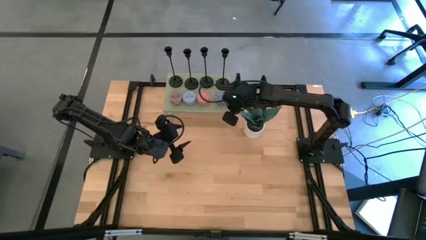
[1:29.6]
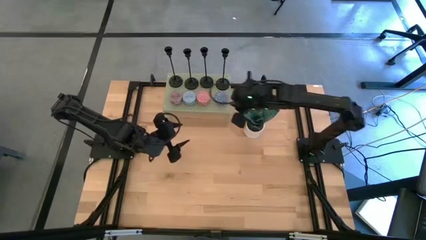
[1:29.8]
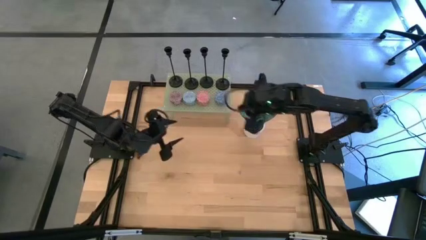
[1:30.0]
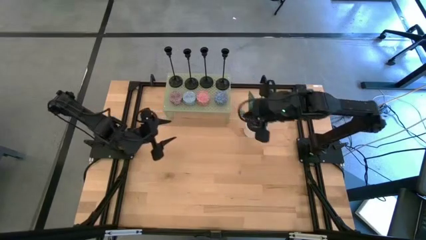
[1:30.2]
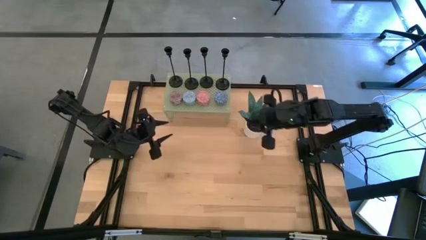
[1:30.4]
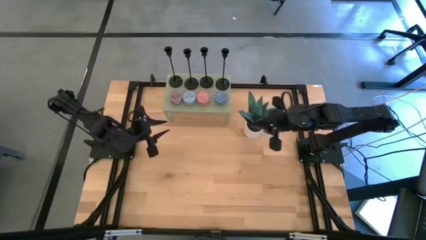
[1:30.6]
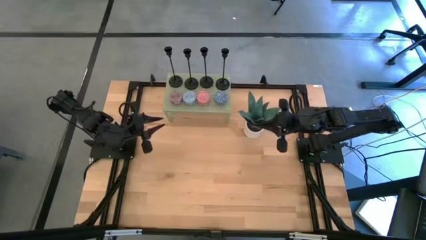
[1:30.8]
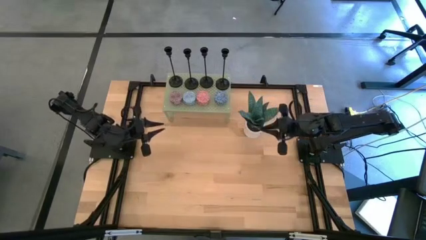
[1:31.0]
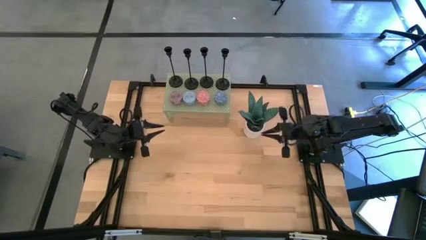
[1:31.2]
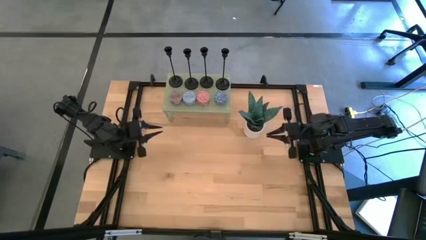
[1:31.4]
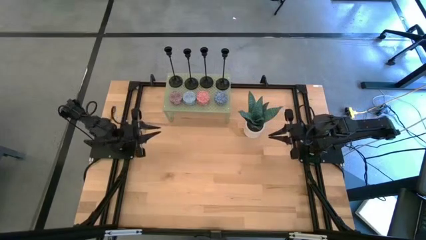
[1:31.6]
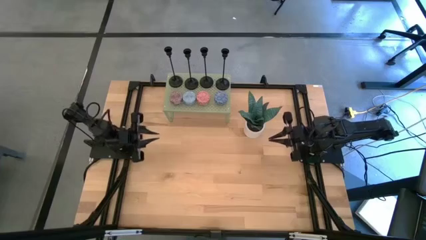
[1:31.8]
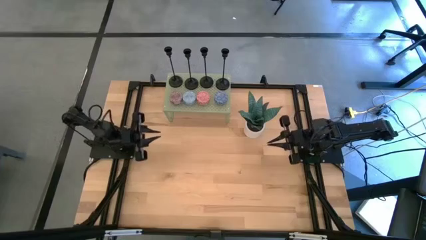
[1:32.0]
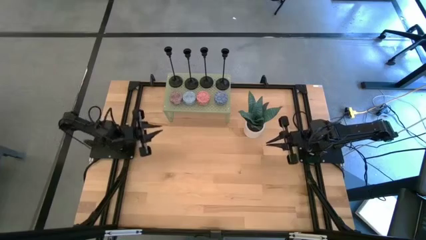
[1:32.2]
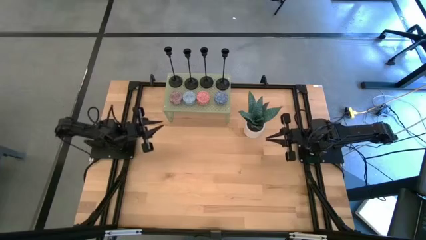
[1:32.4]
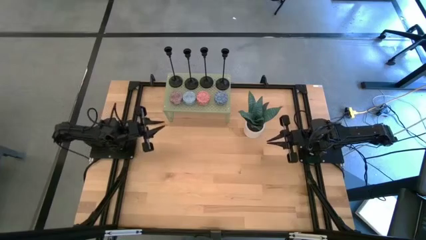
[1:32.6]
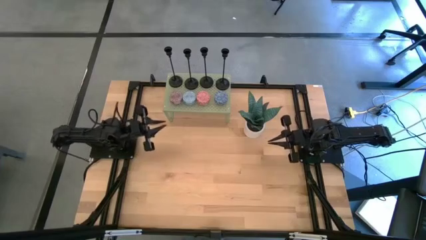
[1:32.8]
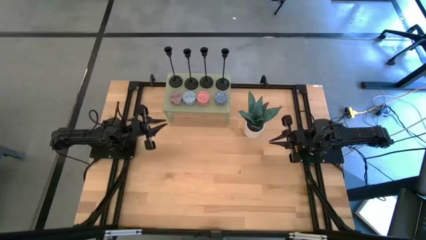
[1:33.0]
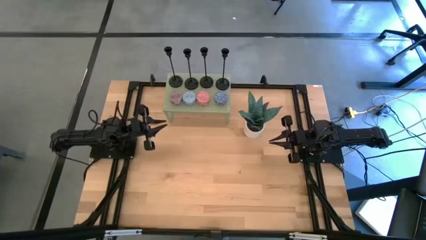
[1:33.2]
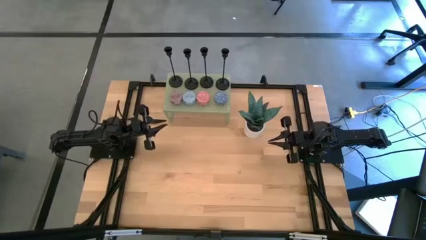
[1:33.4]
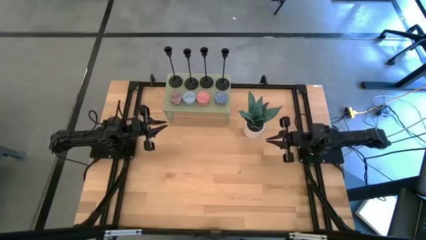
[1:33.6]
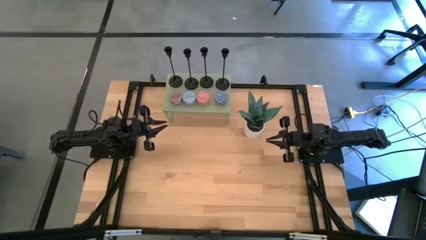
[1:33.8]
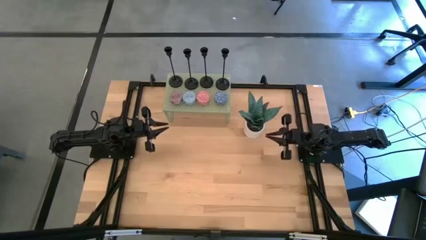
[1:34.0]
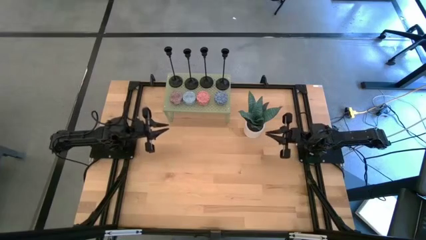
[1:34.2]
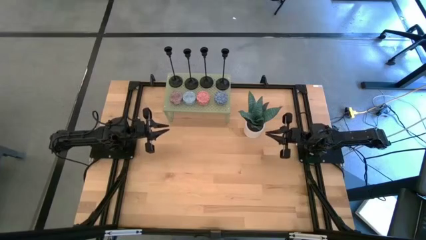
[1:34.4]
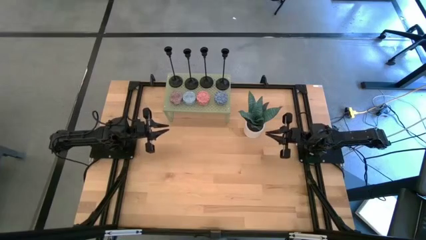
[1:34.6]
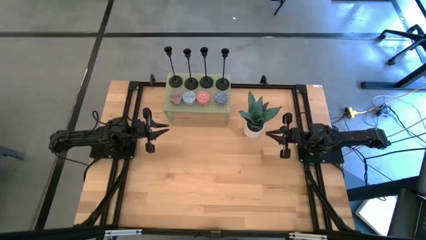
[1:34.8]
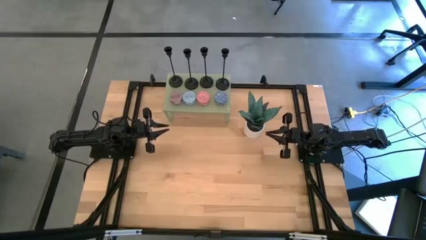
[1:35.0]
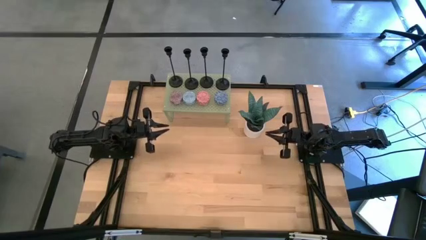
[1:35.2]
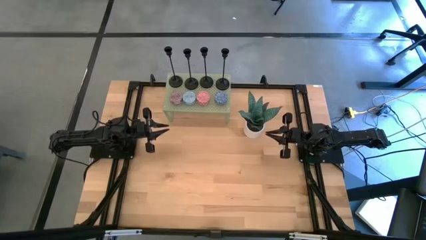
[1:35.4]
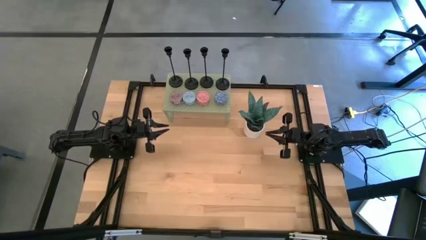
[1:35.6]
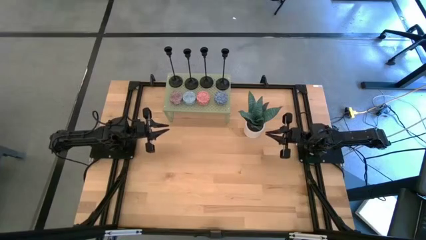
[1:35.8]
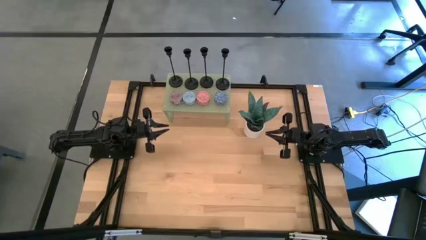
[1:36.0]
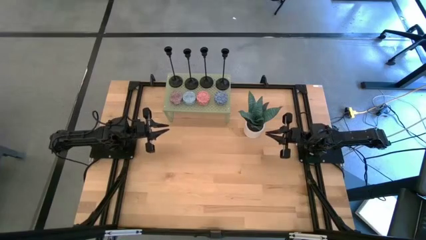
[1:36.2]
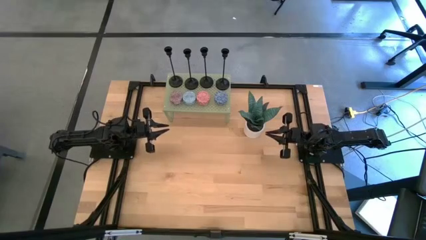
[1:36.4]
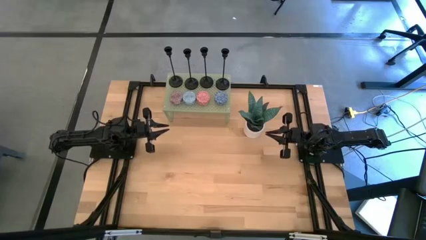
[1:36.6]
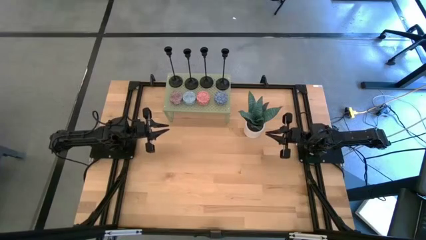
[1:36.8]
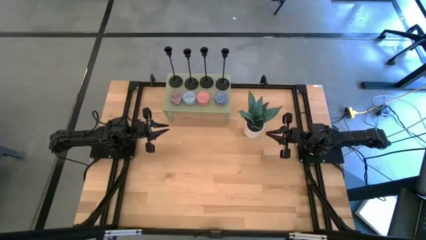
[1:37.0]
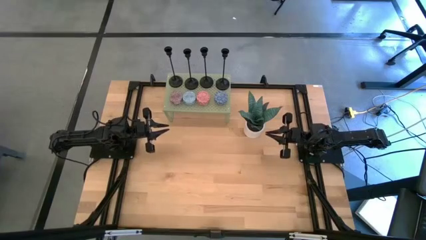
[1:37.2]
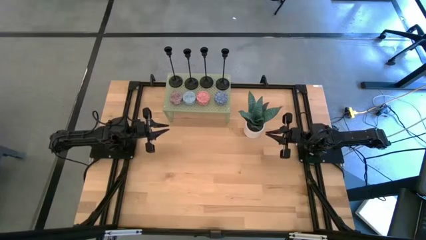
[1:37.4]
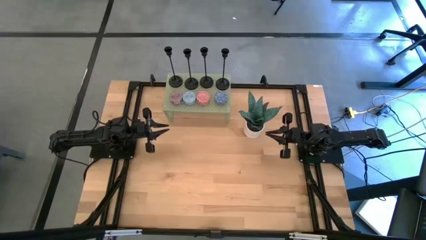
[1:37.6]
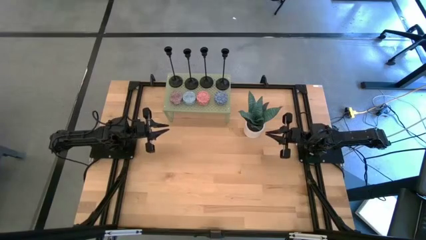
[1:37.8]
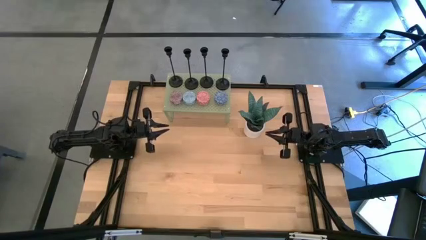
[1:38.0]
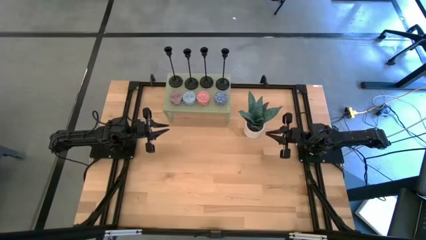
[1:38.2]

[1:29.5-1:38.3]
Task: Pick & Place candle stick holders
Return to Home Position

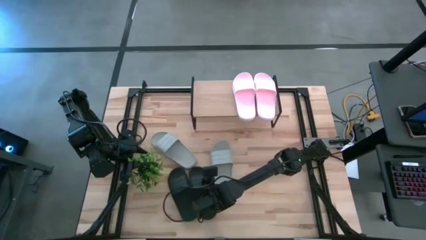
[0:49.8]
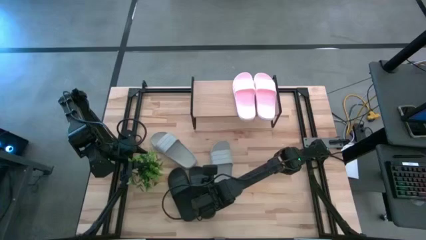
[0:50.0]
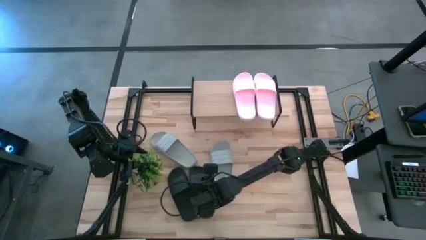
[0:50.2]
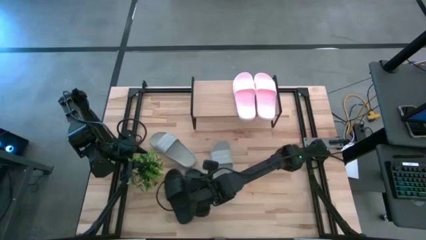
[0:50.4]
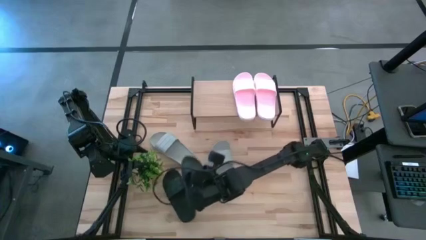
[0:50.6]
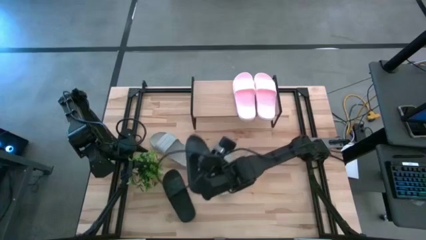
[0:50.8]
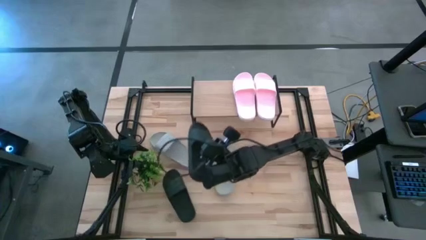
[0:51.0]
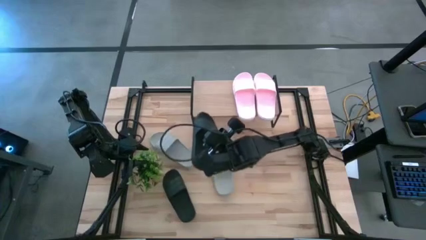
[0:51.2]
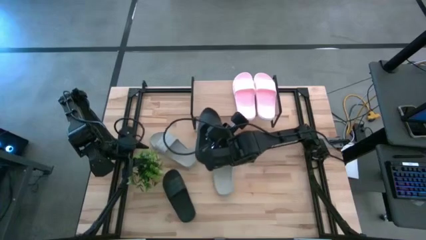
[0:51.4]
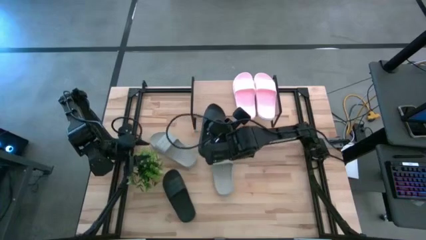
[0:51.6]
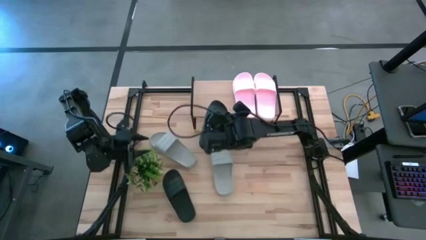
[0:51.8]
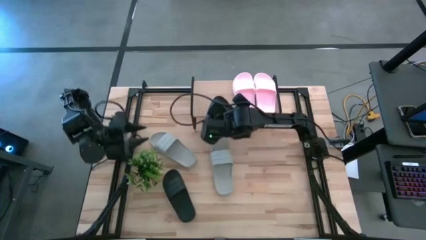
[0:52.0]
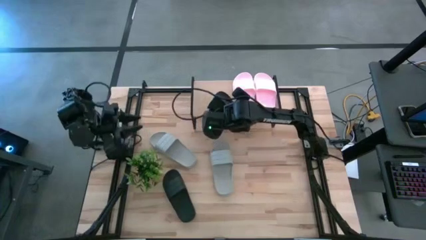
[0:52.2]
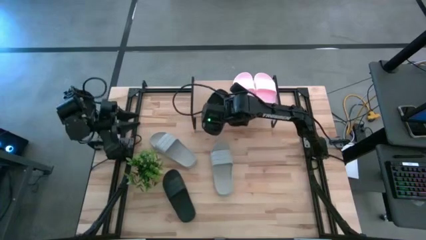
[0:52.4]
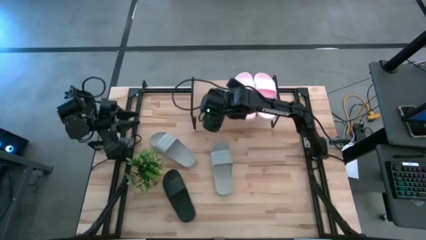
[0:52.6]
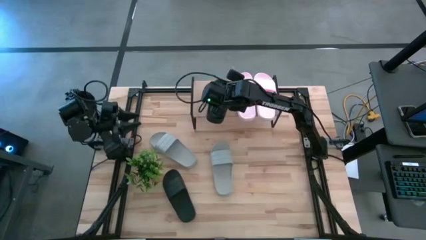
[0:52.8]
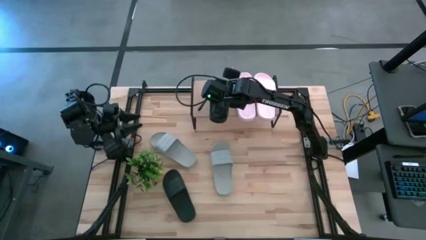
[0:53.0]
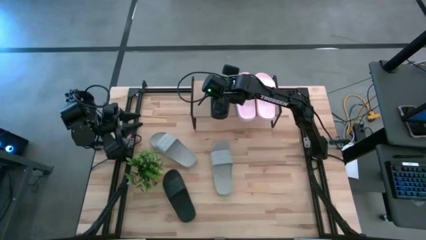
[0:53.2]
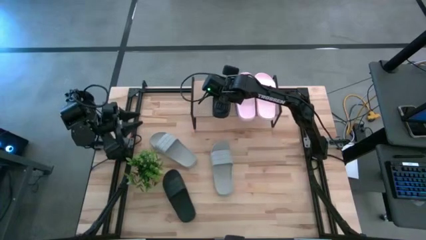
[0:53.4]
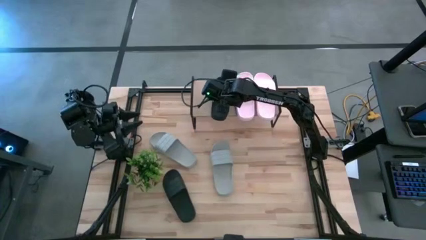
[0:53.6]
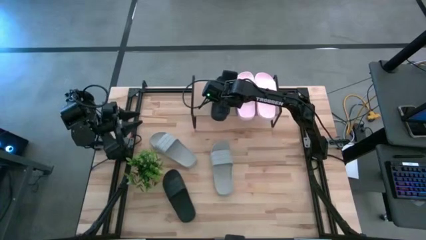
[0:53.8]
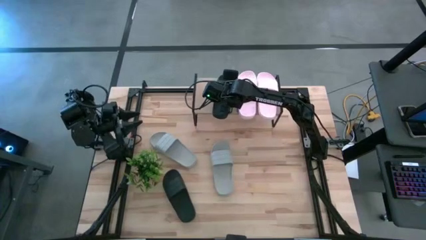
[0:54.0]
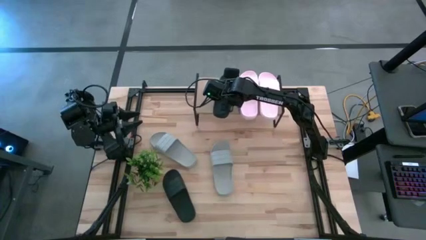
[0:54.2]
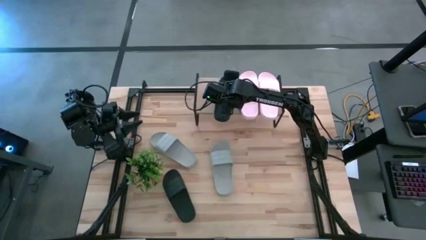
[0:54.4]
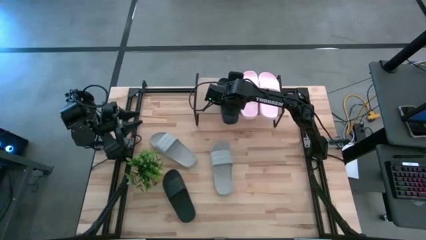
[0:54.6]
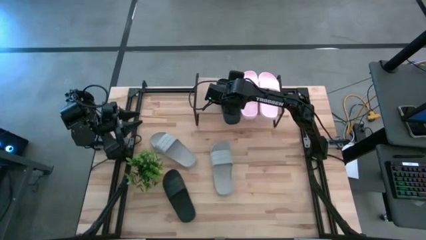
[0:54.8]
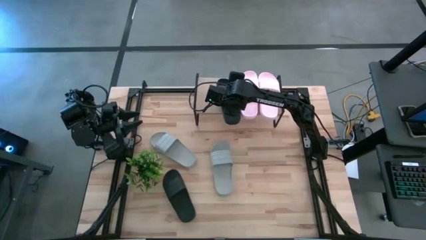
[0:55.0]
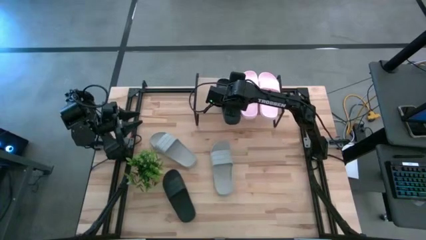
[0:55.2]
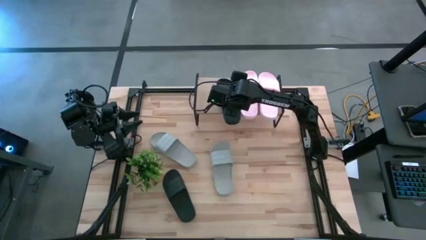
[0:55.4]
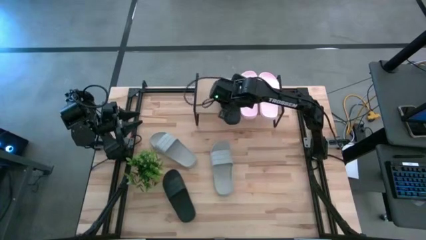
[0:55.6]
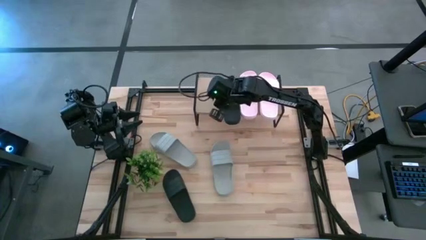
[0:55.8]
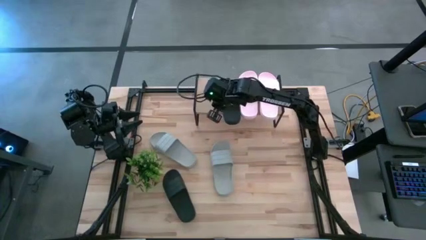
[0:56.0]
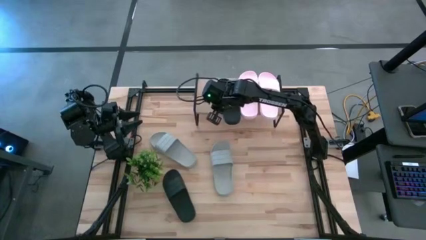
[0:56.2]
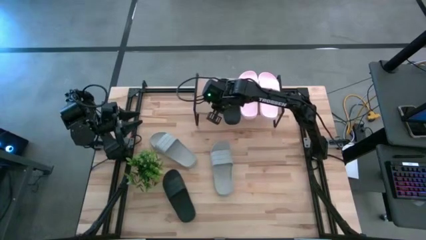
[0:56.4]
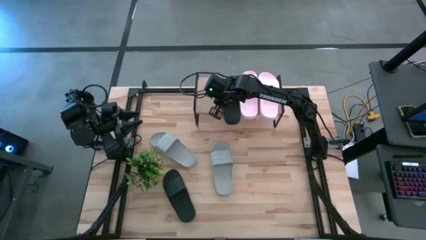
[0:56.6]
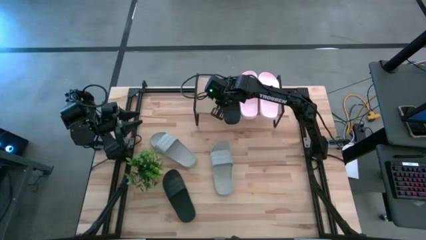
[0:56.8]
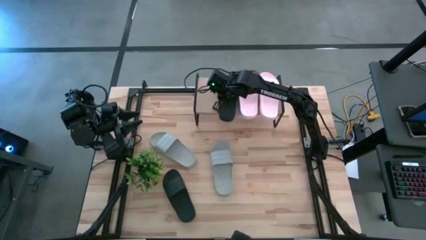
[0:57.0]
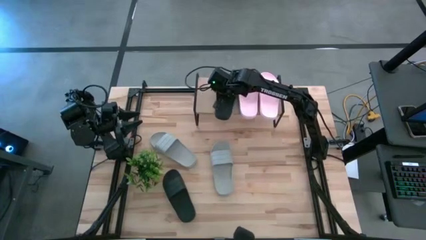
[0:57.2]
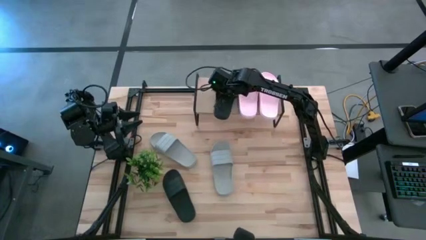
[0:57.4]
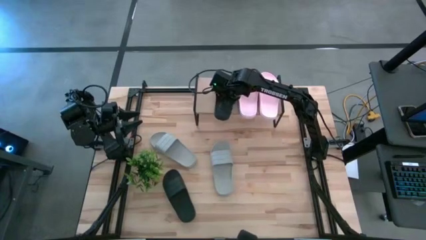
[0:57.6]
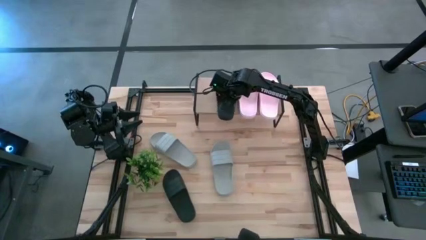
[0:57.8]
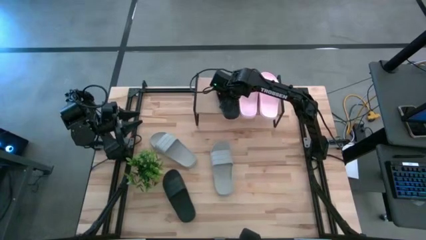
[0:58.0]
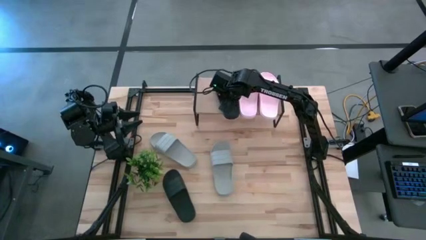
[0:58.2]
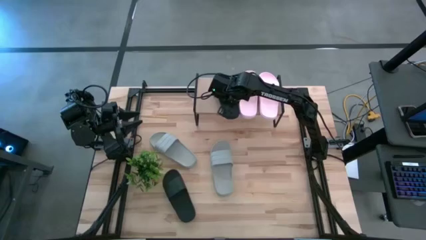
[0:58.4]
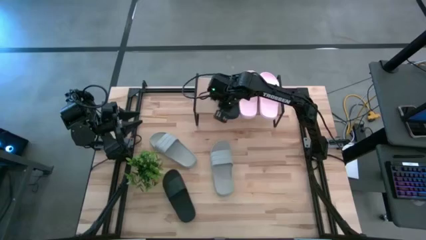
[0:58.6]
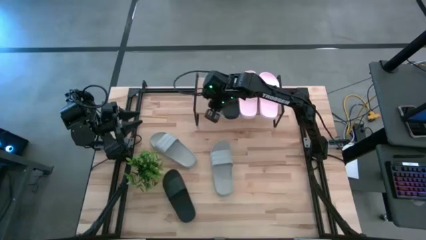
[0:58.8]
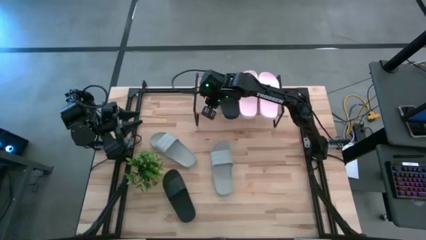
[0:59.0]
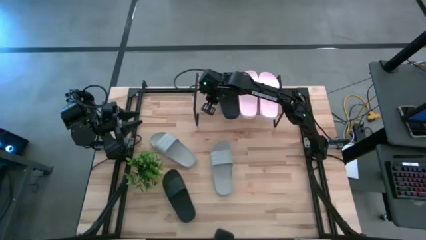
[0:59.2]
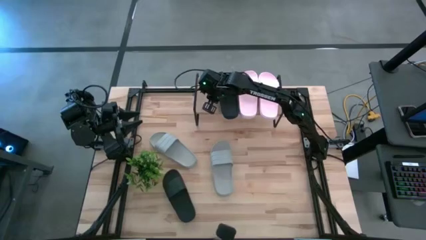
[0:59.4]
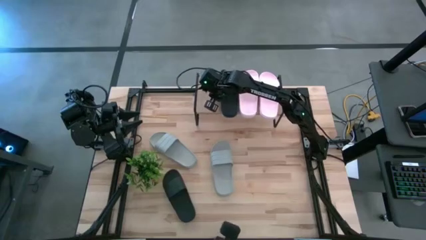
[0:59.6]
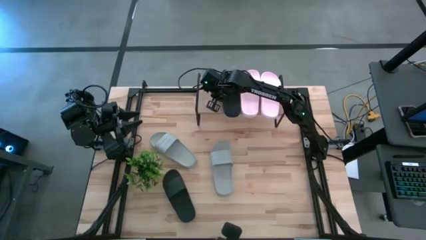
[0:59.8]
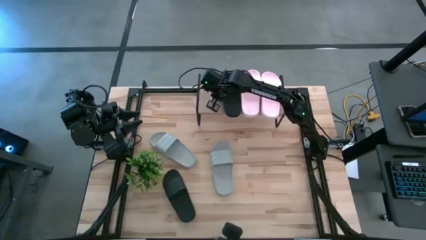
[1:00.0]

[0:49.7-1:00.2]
Task: Pick and place slides into the shelf
Put the right black slide on the shelf
